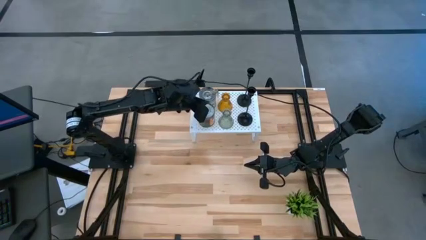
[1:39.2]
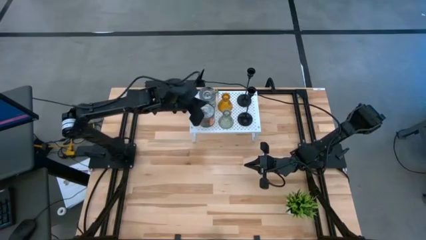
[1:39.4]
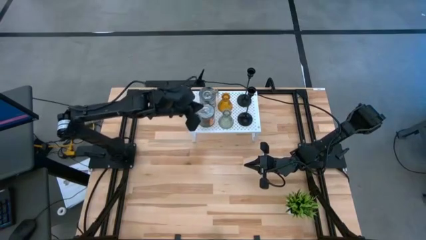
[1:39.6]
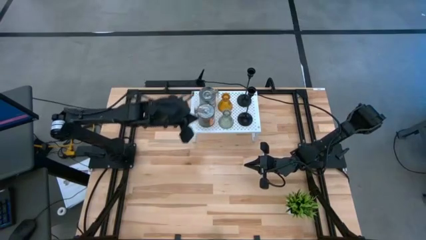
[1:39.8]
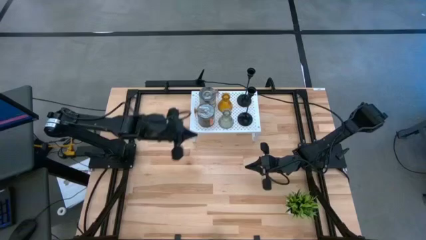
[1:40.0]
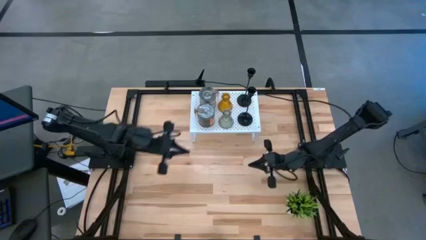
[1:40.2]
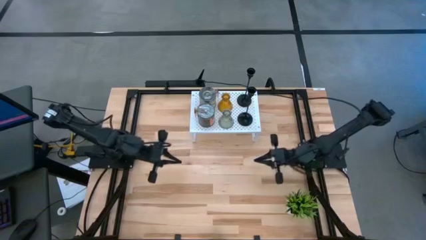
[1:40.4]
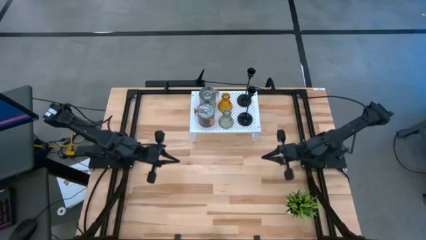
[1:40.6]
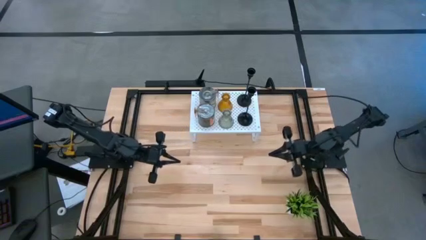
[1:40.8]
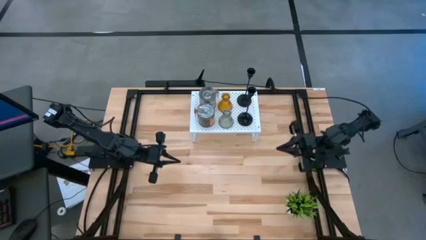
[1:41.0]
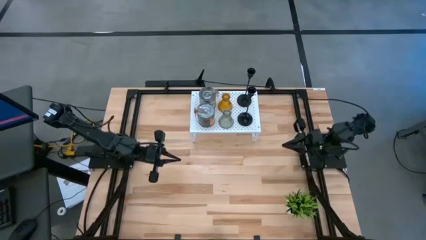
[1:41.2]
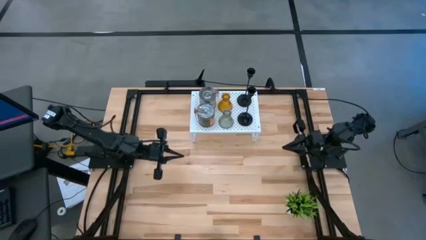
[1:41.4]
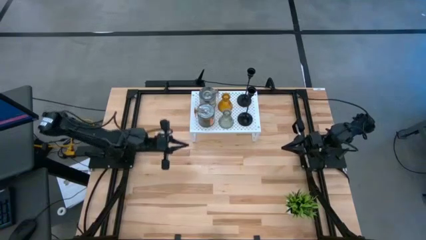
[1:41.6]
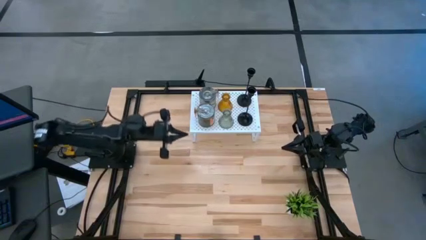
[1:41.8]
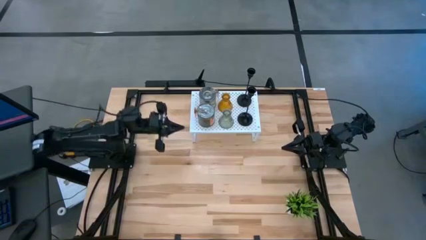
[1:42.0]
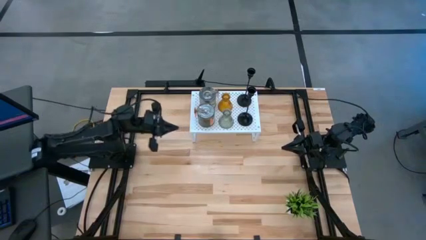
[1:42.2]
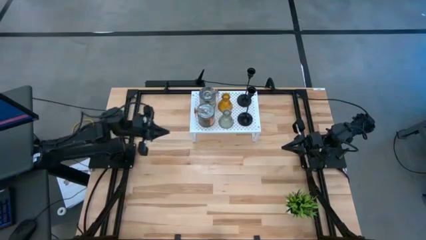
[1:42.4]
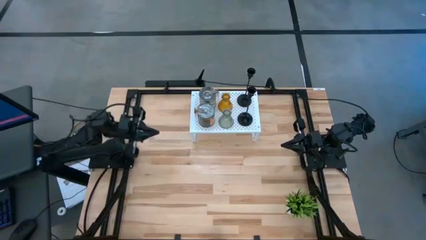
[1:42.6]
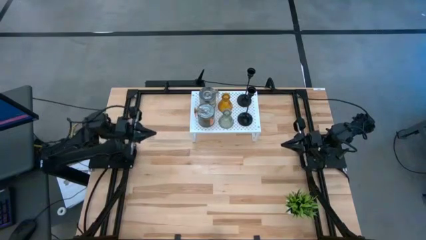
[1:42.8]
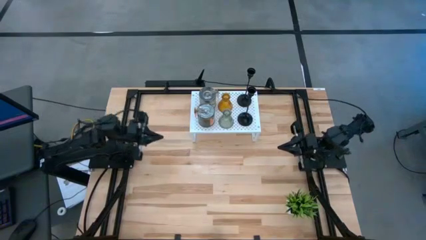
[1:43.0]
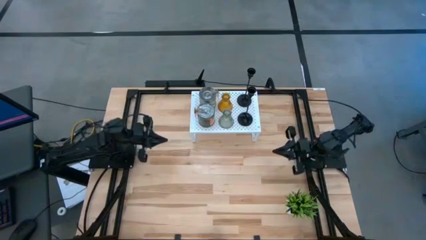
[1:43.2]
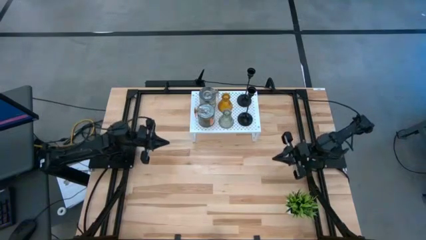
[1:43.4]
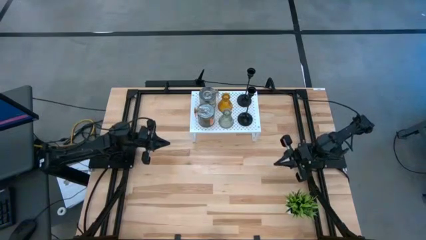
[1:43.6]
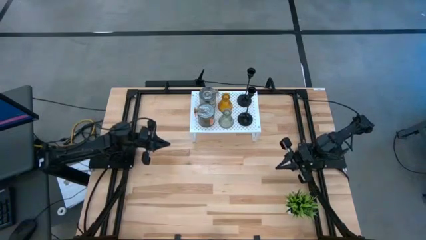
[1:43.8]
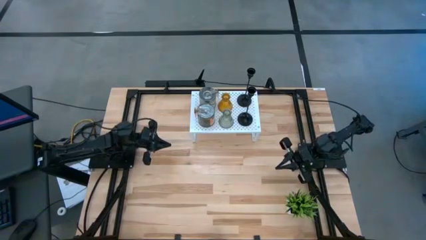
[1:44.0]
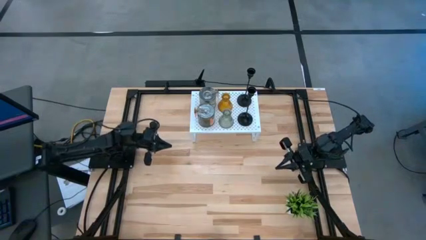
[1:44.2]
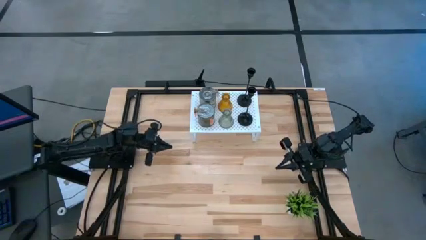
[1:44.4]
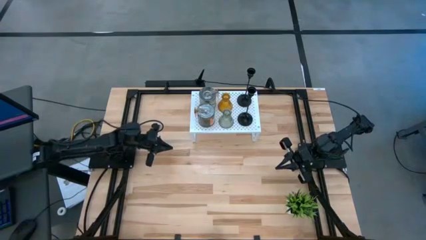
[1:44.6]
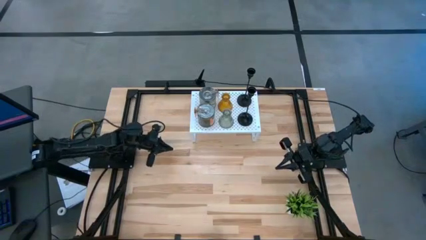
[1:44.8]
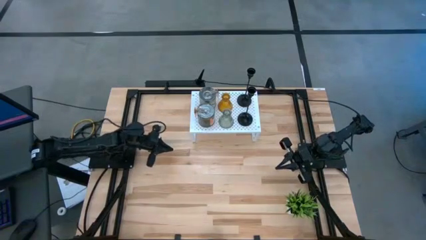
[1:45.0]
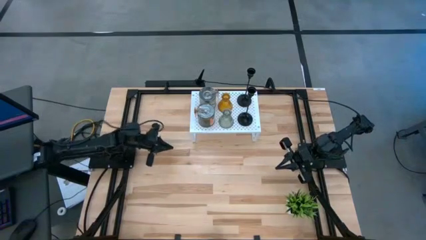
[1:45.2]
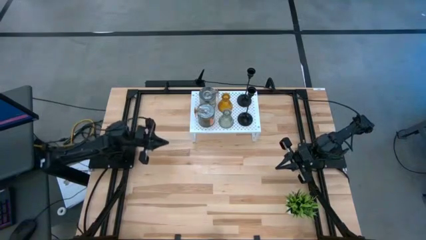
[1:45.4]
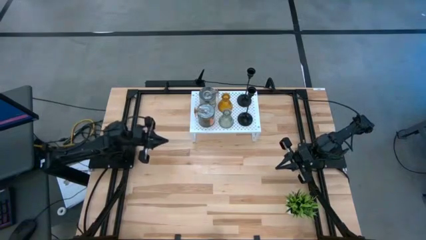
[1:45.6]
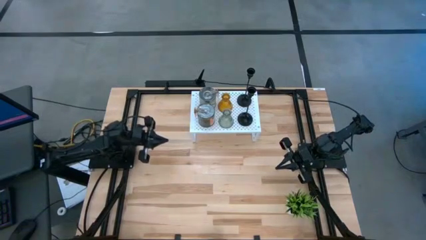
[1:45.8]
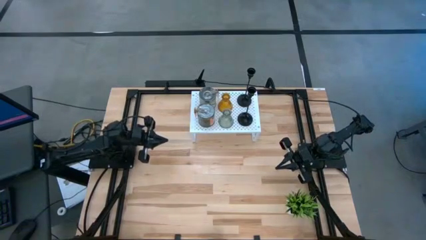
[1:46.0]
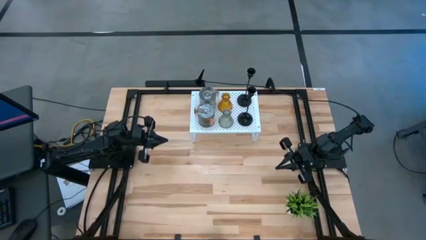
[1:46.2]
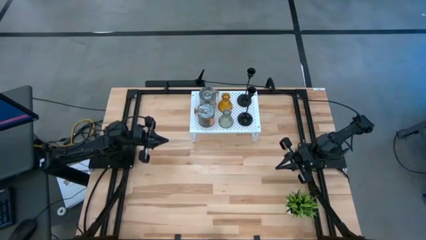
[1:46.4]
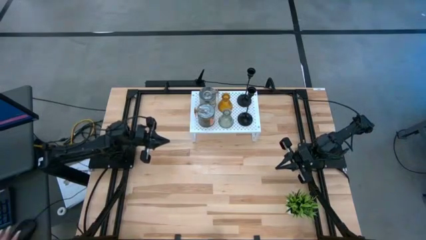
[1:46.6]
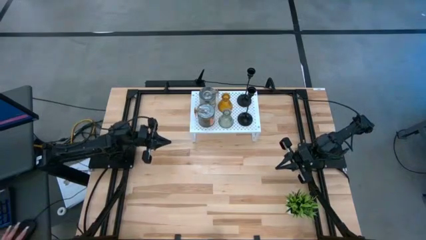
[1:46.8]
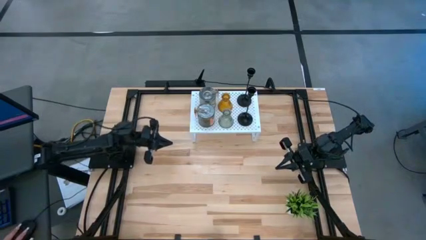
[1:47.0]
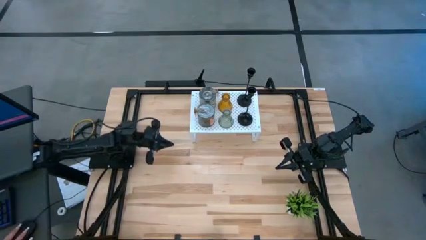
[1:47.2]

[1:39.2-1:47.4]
Task: Pick & Place candle stick holders
Return to Home Position

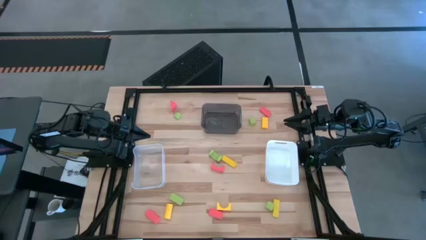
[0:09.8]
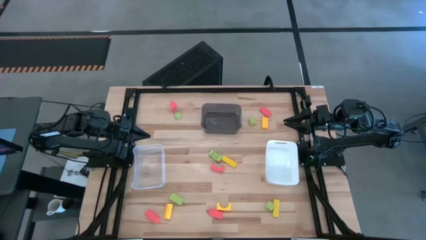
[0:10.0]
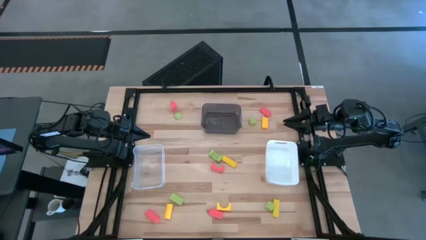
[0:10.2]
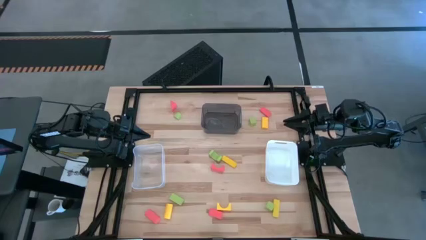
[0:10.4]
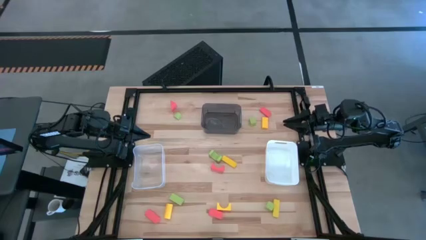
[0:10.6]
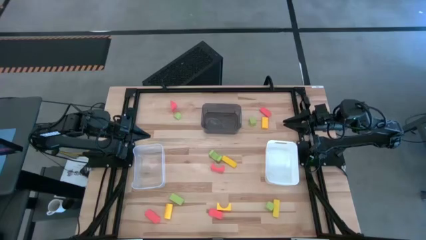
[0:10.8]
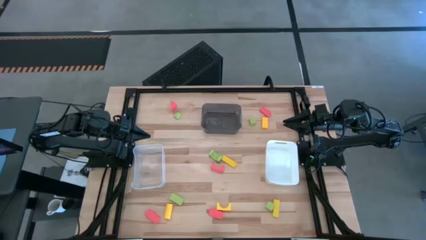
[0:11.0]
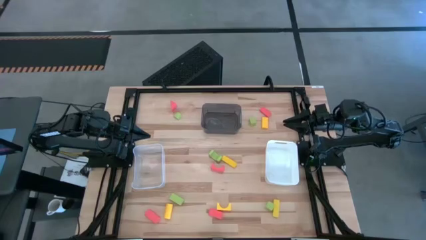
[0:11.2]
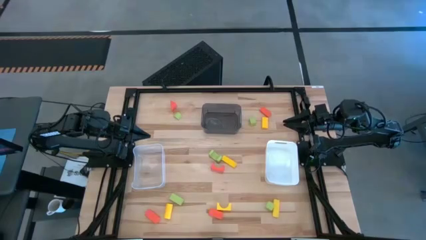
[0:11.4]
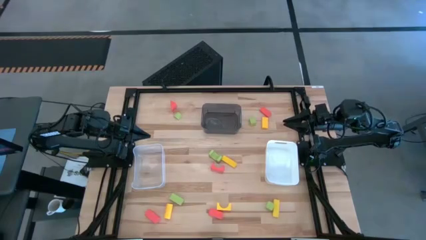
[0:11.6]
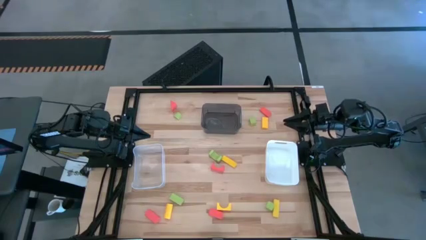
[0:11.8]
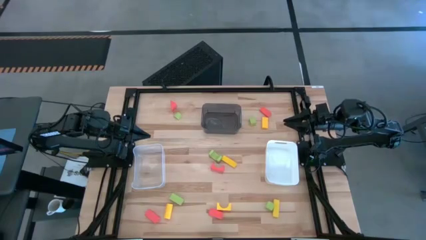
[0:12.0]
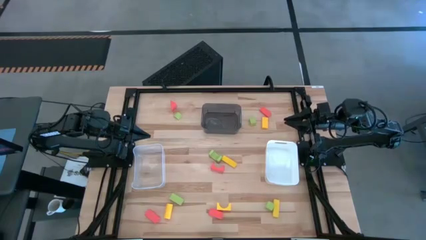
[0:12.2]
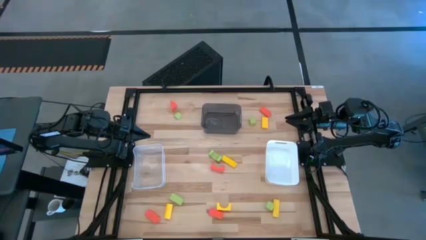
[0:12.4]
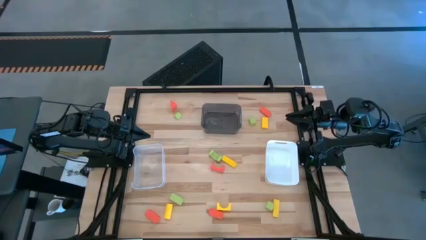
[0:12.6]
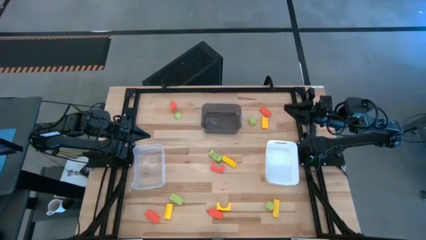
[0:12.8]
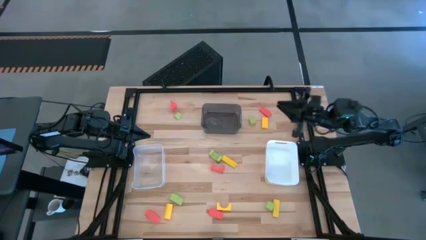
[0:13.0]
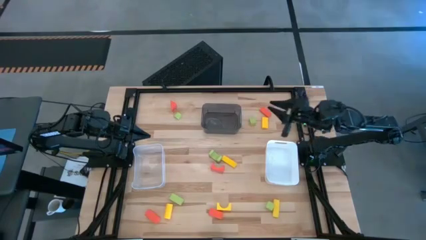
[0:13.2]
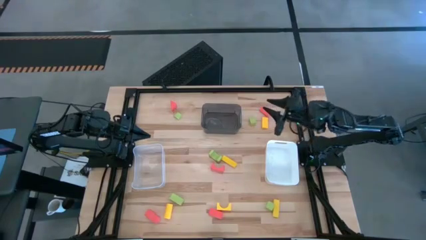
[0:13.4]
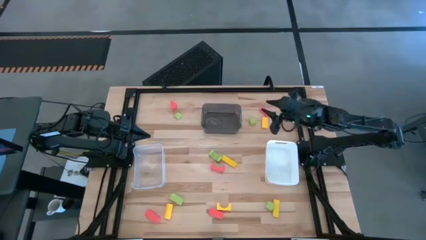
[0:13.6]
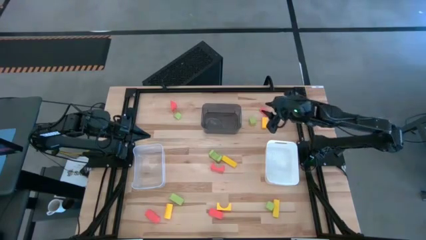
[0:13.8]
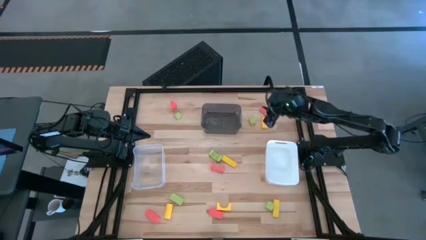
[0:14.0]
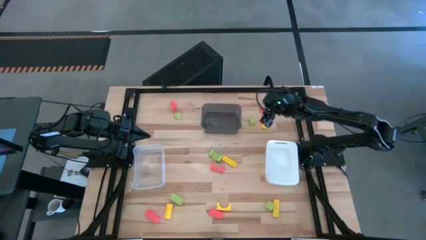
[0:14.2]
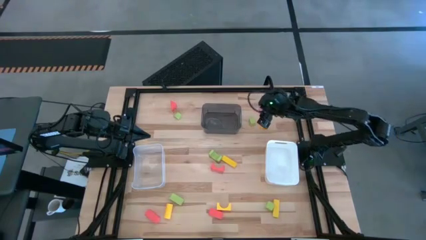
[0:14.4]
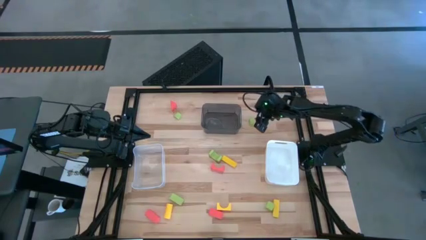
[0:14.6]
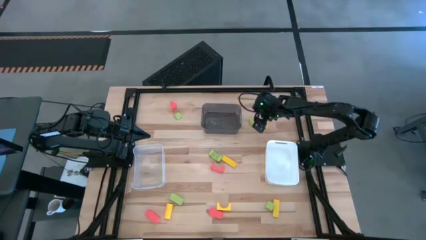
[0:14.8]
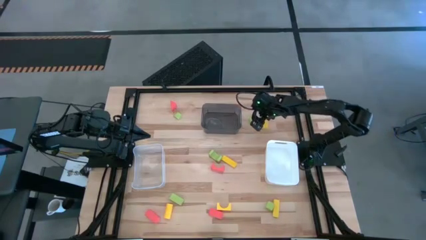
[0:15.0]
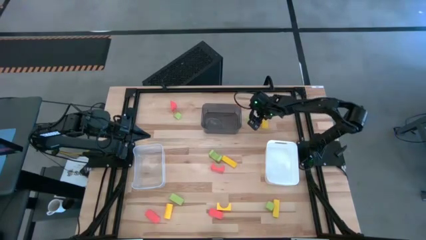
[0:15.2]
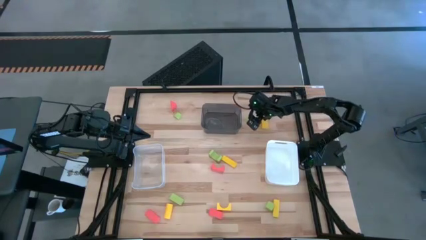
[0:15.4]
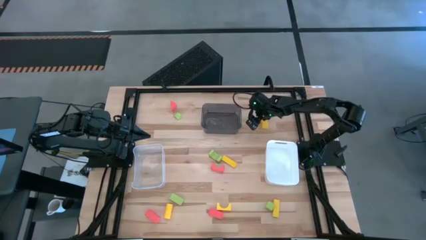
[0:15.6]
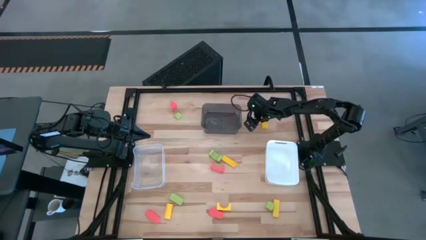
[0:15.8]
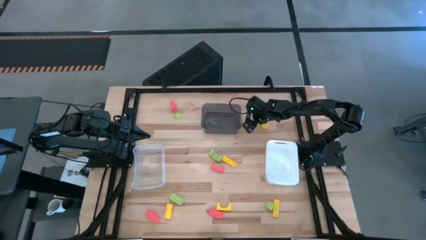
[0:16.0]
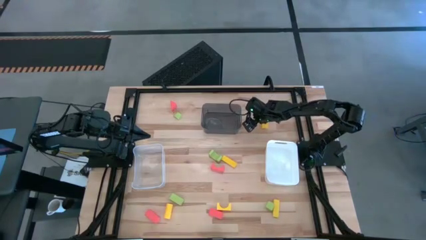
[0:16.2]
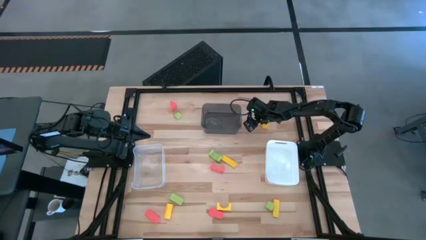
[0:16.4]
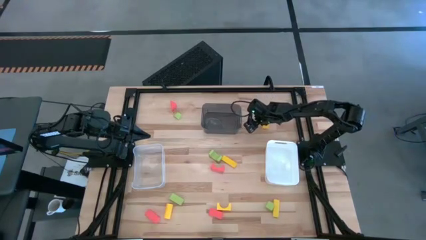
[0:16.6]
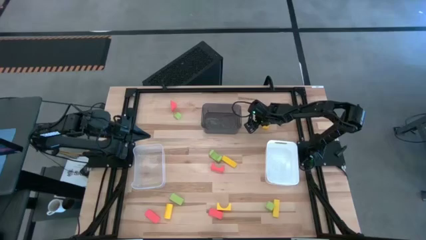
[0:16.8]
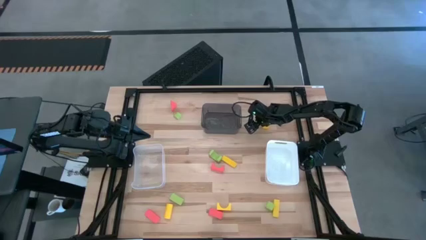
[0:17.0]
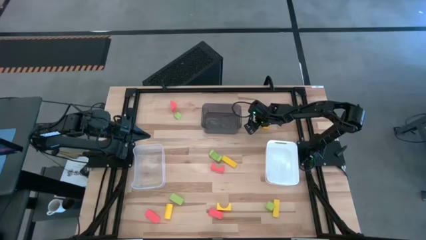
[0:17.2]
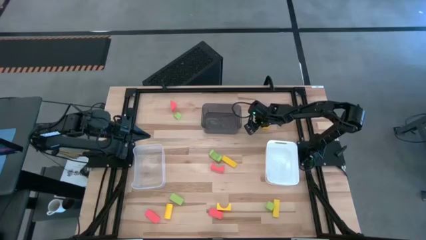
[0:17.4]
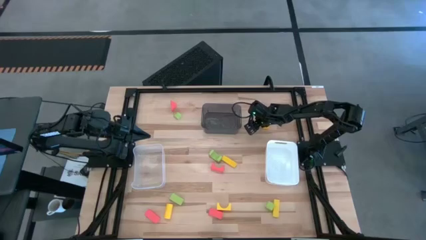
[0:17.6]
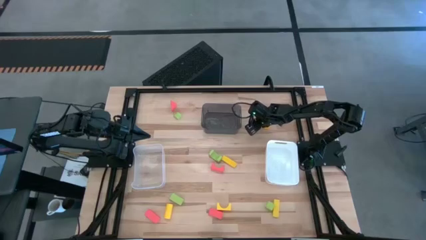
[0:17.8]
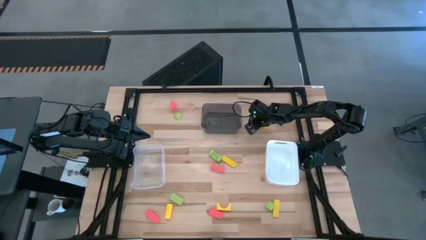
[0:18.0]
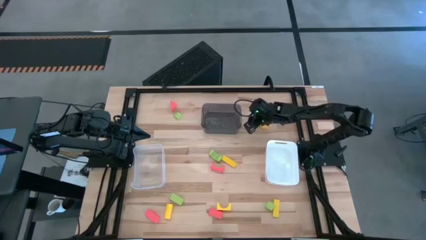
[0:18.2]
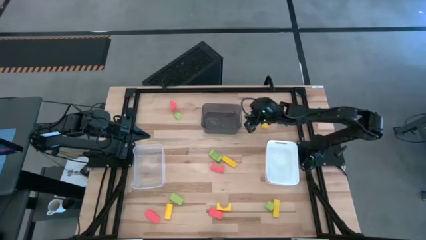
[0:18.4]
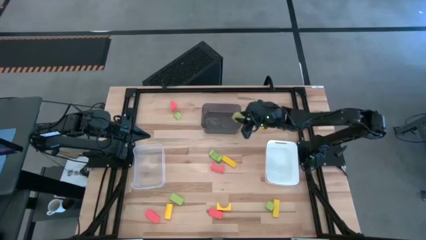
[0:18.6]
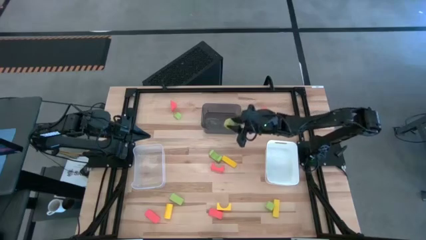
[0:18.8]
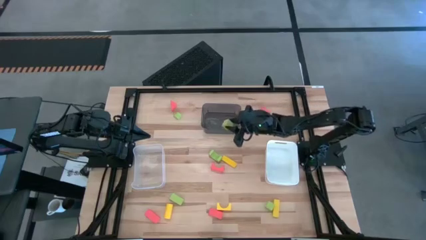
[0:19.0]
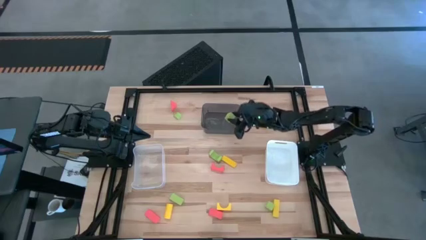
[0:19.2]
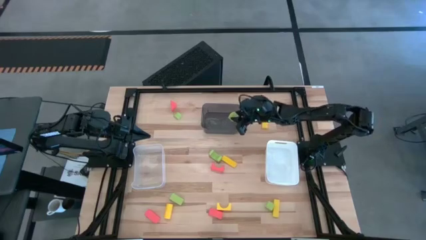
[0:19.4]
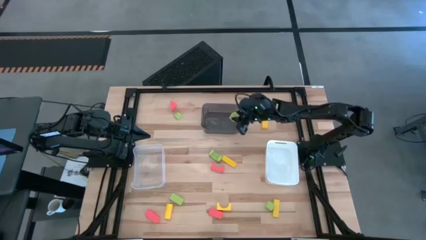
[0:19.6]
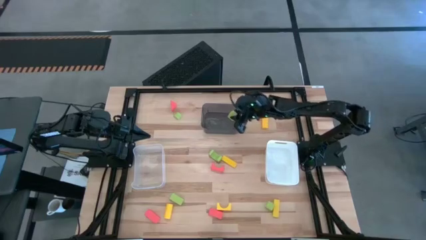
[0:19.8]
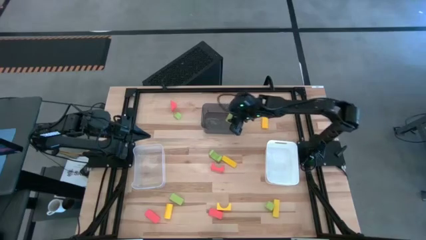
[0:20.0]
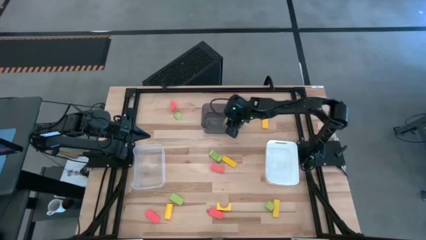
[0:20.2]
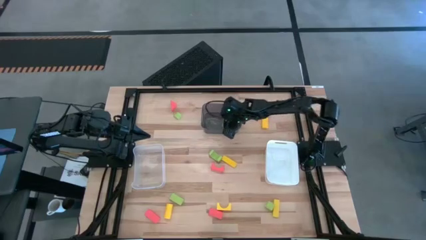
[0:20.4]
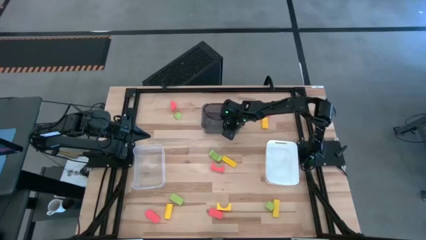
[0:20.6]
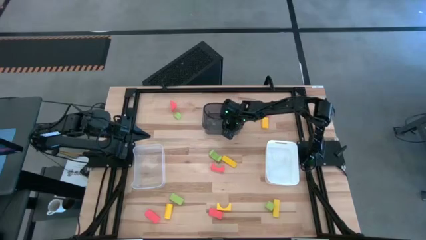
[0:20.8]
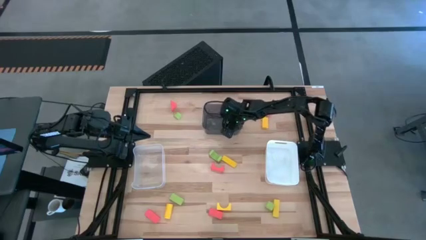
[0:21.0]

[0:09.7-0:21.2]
Task: Sort & place blocks by color
Put the green block into the black bin
